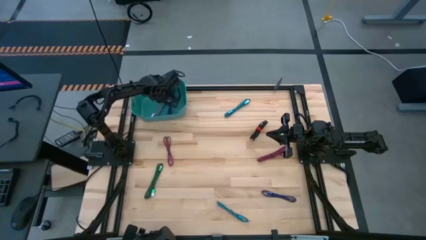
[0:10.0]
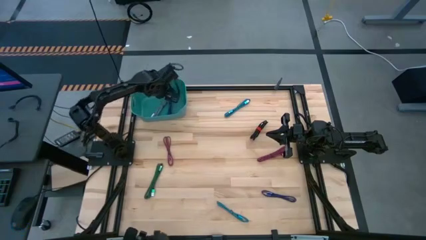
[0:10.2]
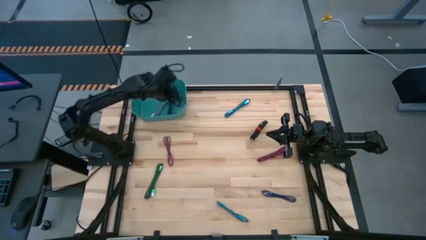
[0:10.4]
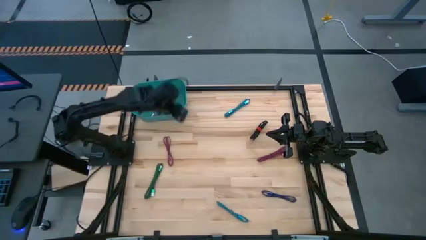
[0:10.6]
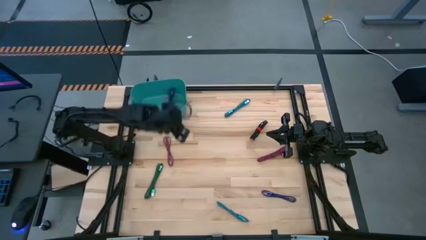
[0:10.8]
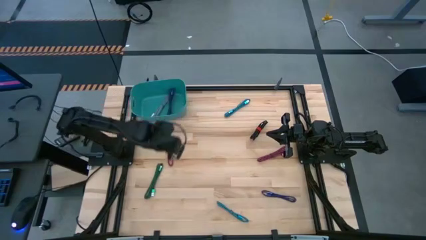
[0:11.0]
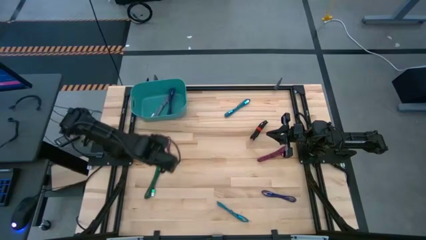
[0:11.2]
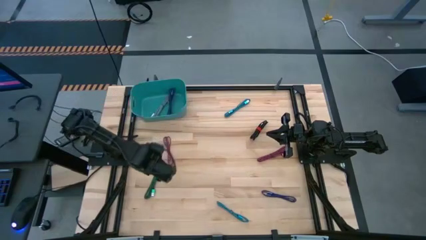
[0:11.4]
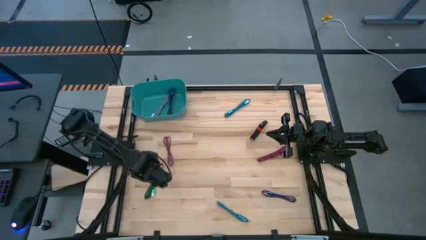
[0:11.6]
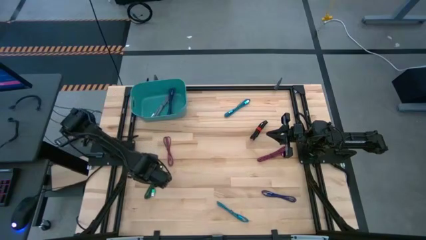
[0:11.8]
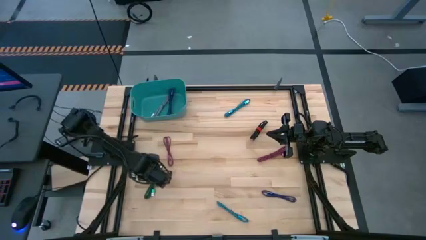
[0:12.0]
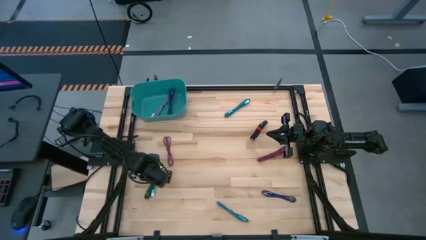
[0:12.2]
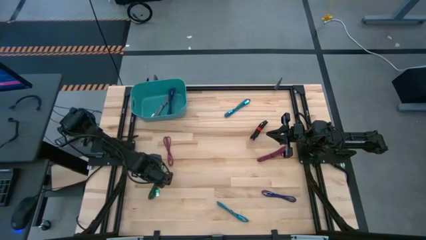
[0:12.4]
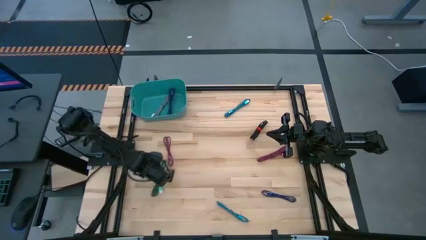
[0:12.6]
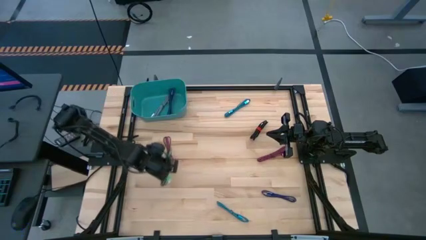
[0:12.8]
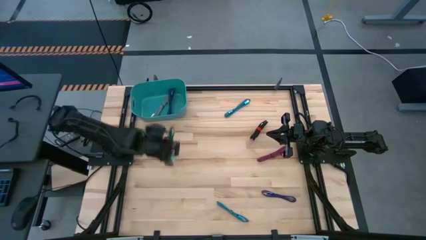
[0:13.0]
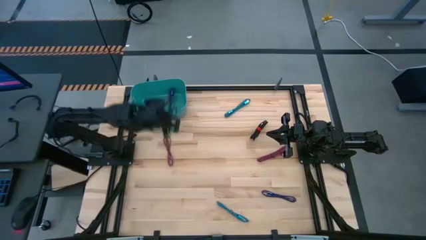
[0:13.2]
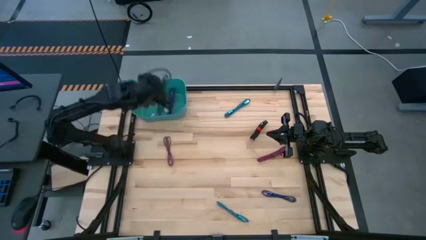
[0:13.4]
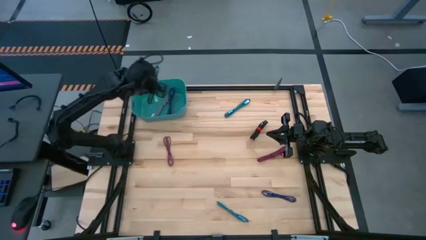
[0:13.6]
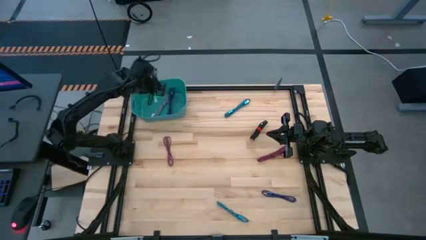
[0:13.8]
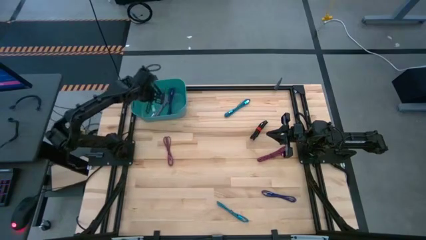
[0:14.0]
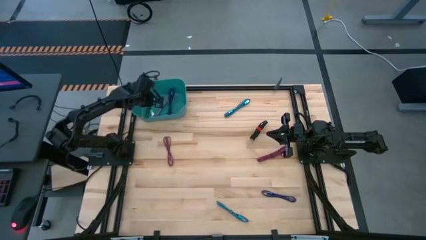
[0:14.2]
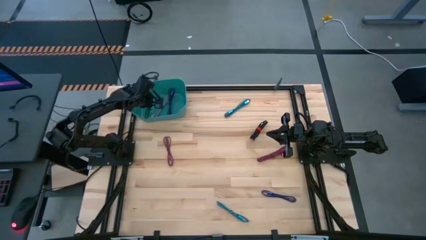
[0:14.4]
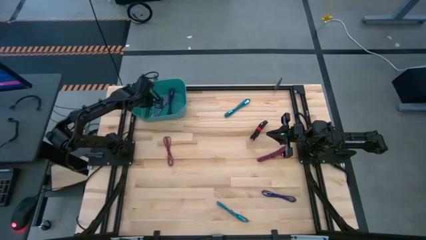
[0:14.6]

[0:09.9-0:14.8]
Task: Pick and place USB-C Cables
Put the green charger cable into the green bin

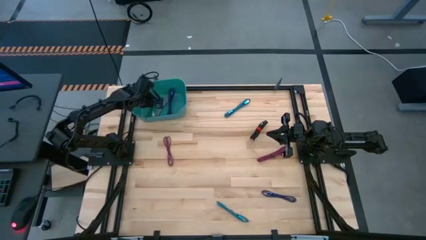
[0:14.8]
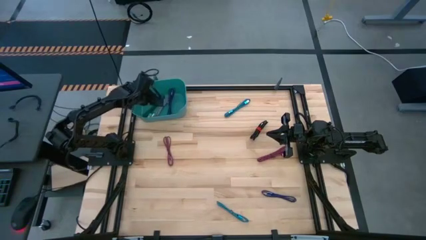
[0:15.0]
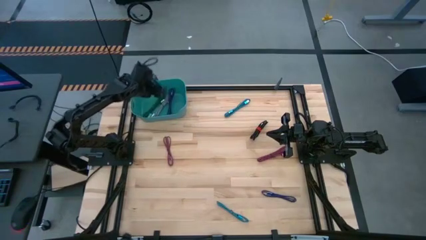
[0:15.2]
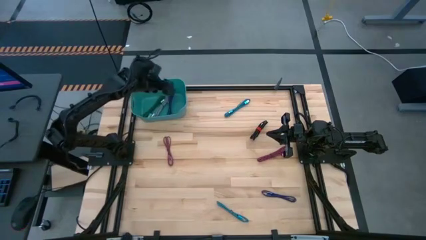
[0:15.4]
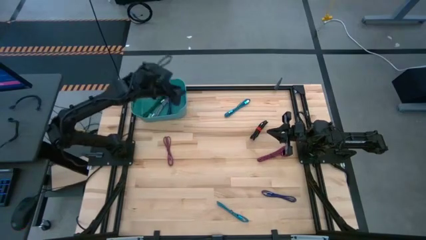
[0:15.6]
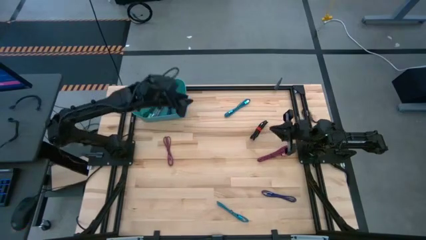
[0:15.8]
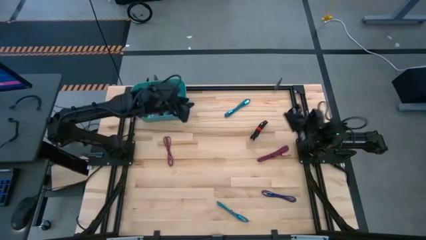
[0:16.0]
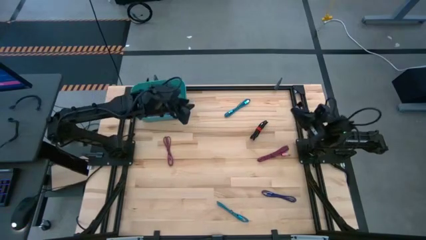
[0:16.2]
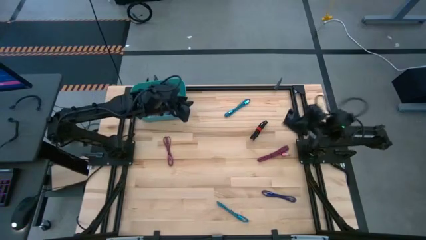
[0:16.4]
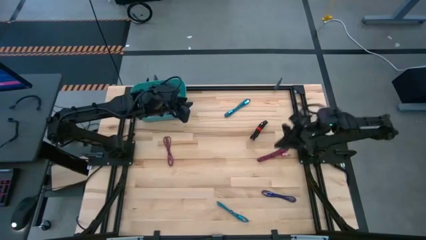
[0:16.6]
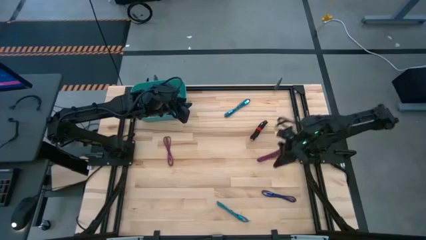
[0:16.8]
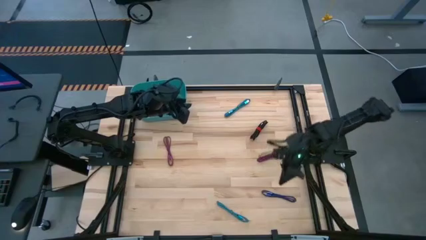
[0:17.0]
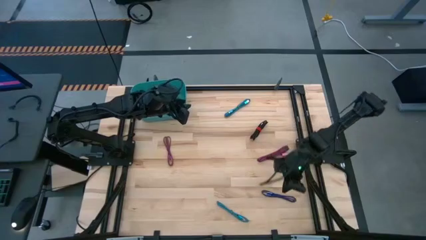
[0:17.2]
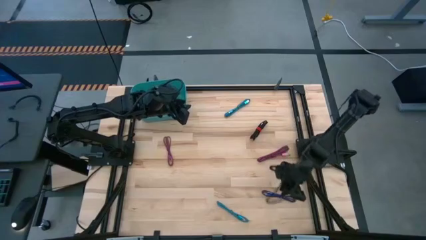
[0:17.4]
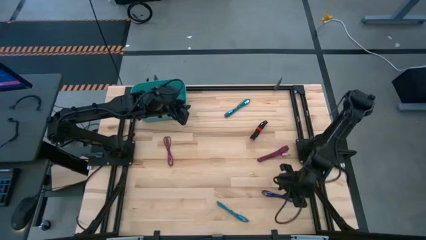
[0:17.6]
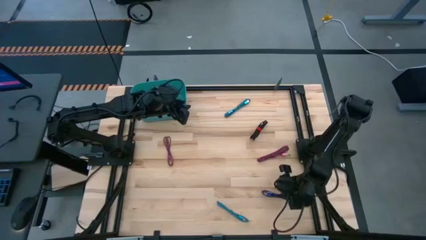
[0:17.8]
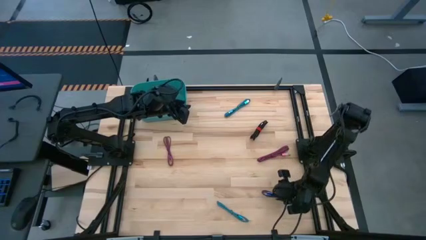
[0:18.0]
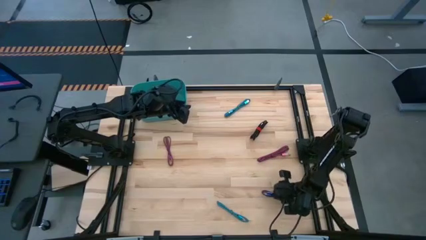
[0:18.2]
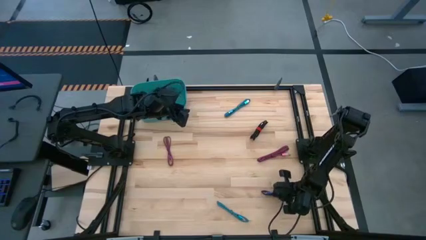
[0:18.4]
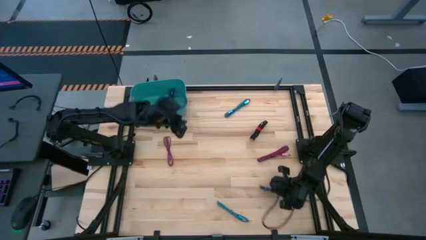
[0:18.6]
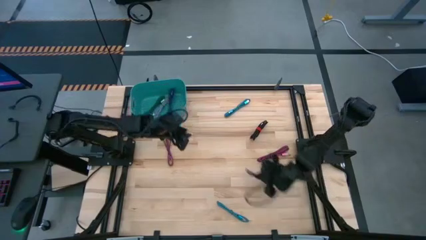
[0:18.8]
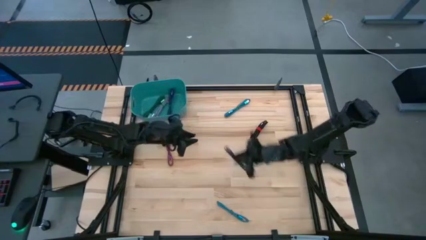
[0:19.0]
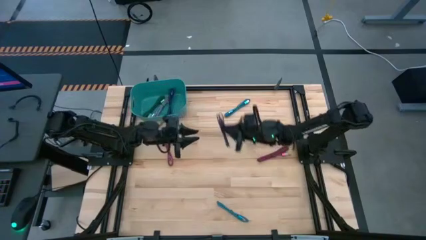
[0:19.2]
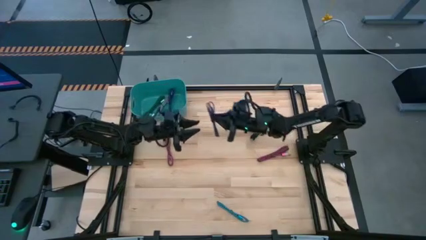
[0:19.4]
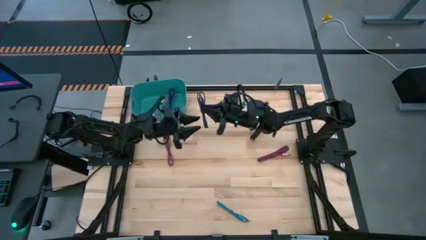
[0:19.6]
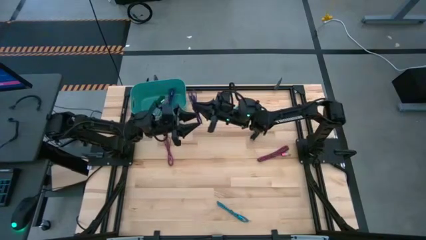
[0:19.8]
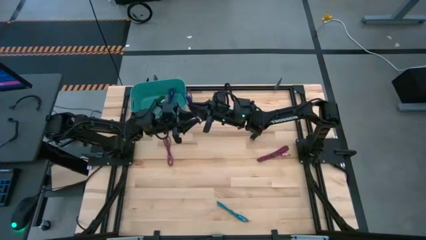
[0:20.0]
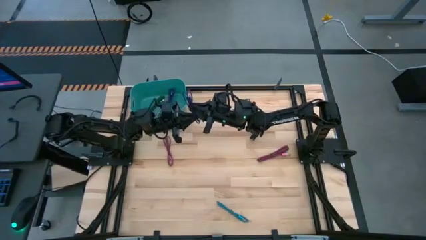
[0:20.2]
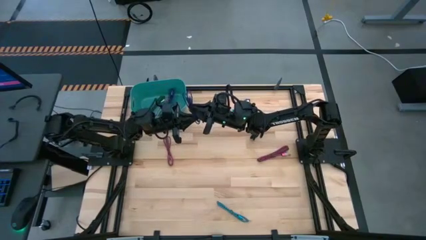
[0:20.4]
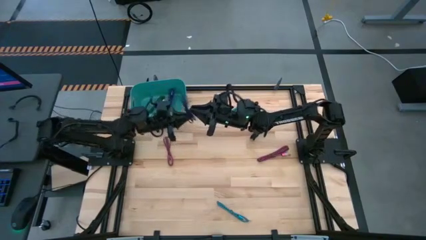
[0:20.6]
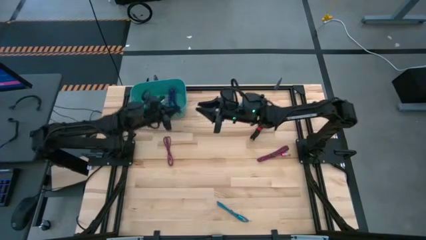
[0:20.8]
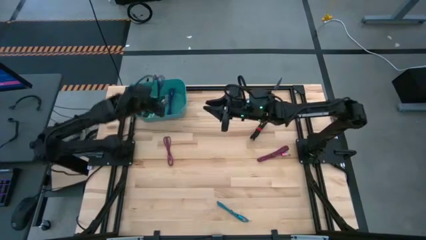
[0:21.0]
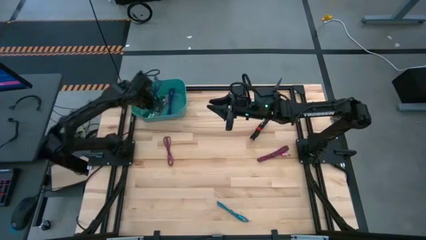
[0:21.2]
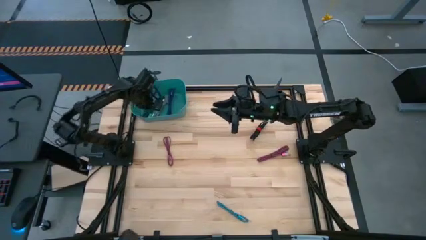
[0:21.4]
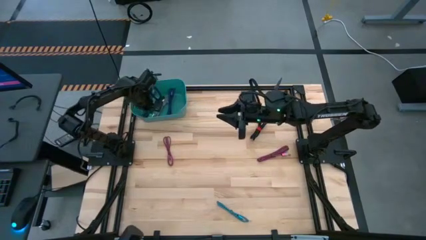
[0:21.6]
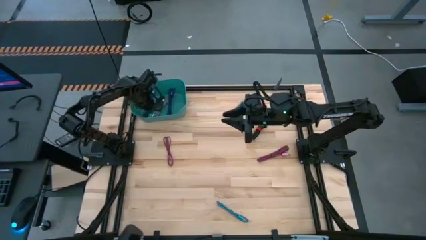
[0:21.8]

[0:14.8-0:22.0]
Put the purple charger cable into the green bin

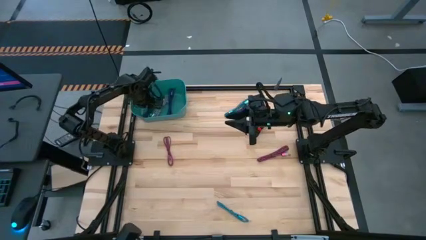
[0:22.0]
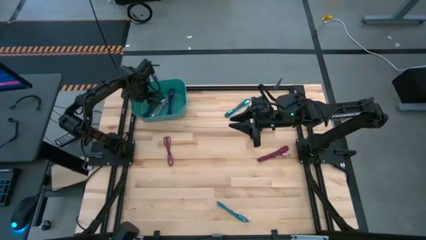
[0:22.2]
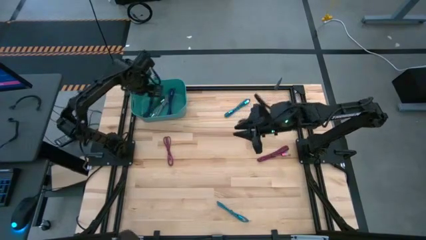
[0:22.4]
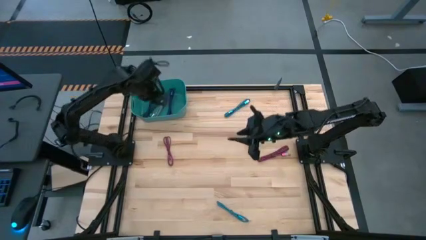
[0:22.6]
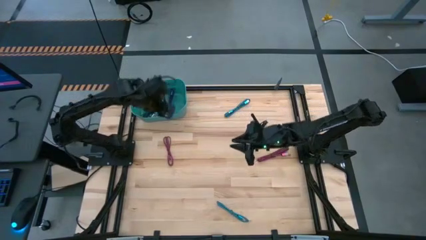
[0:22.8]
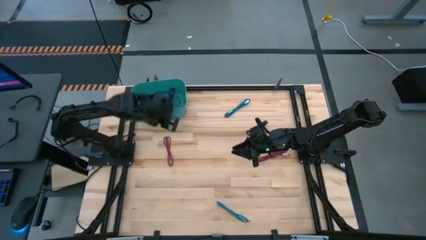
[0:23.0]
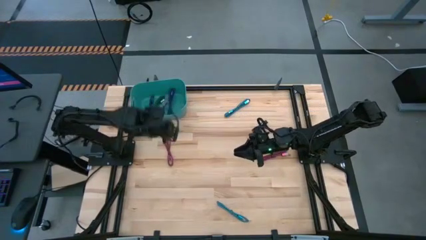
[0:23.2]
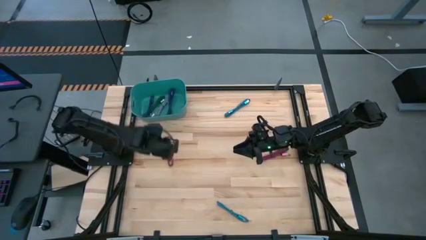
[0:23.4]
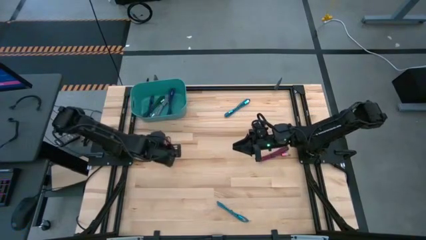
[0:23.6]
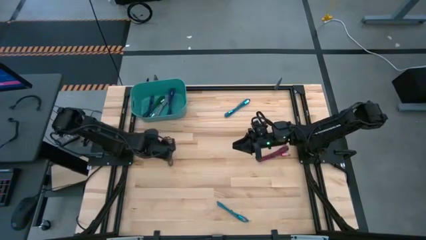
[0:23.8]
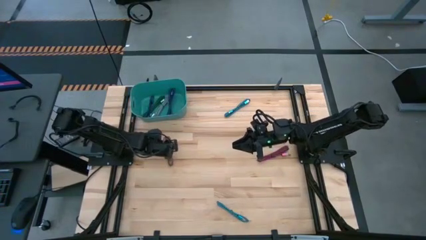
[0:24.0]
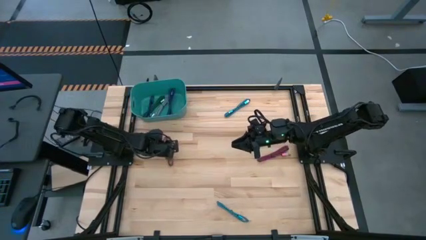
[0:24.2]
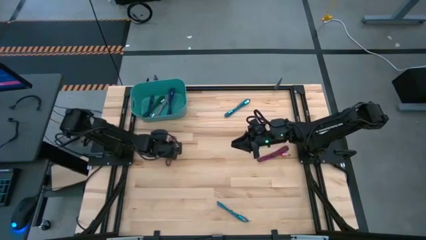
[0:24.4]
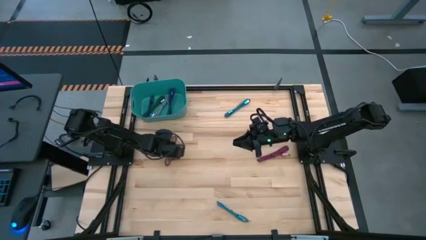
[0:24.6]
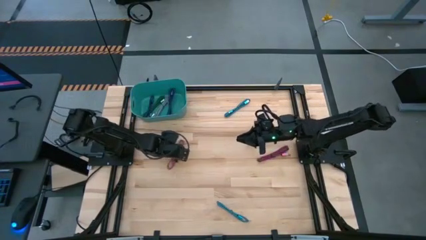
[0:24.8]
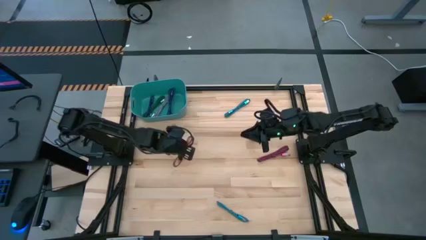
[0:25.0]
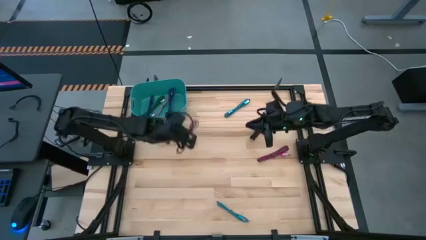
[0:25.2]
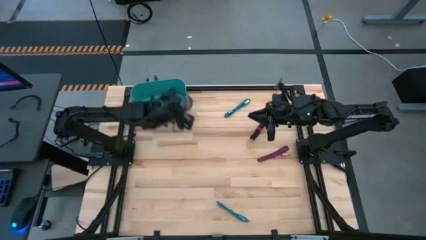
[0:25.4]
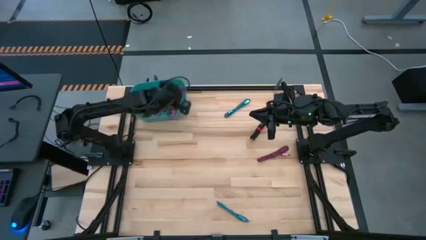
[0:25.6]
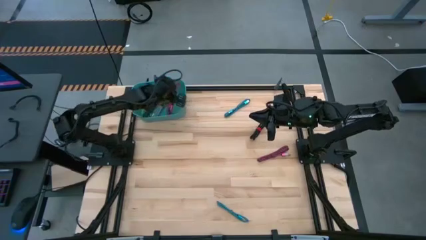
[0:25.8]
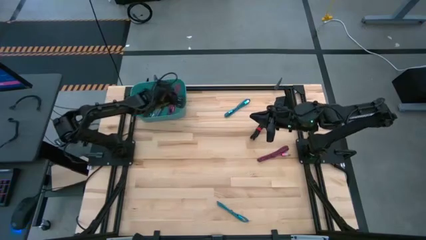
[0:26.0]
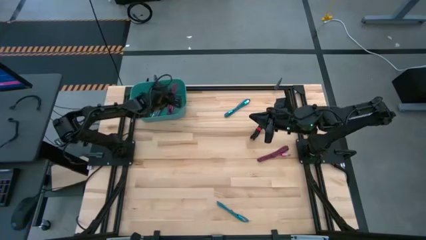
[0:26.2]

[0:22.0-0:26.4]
Put the left pink charger cable into the green bin

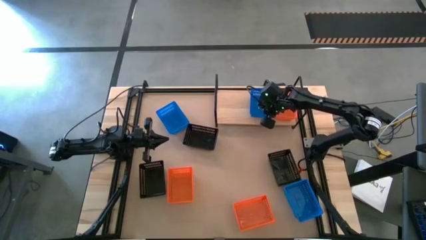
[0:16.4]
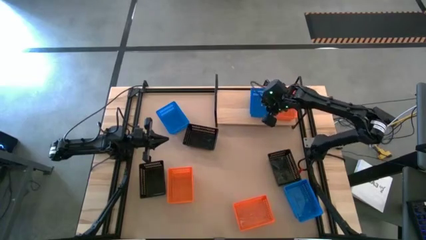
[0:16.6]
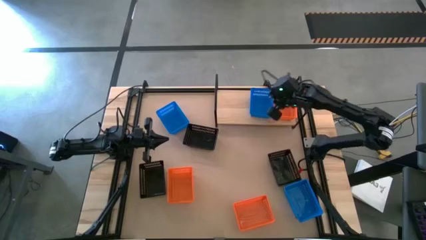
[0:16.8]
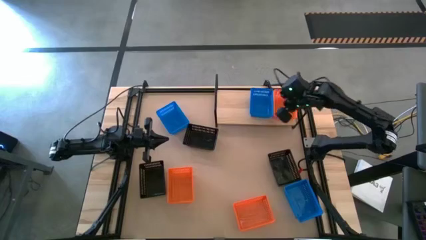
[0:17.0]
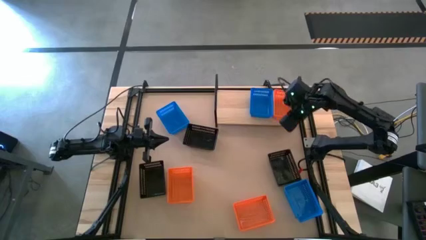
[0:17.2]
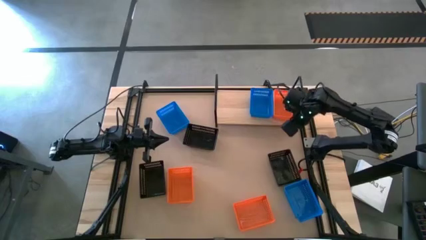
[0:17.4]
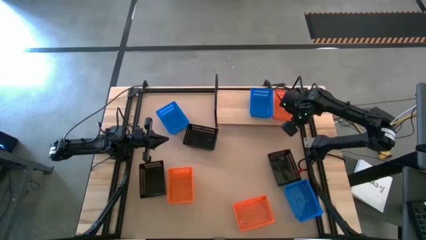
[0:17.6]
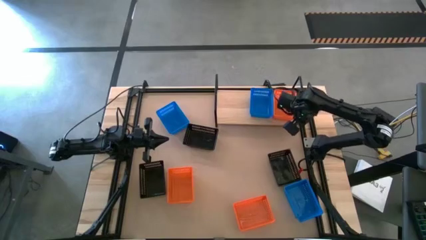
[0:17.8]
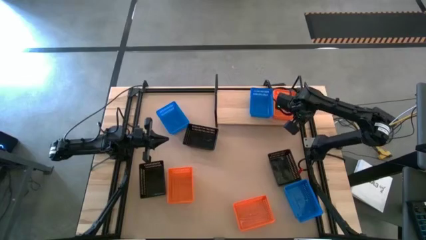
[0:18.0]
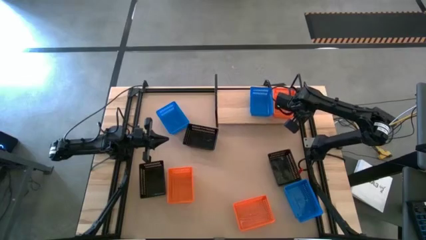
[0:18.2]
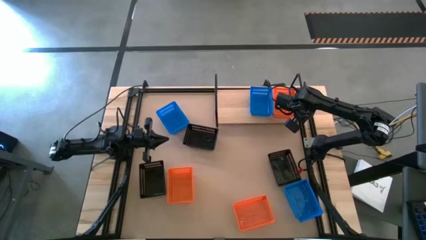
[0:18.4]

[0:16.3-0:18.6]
Task: Stack baskets on shelf by color
Adjust the shelf
